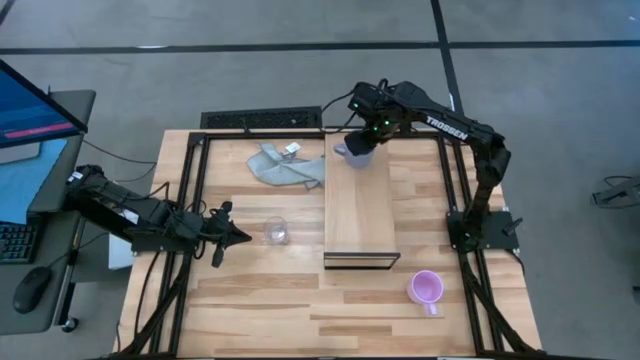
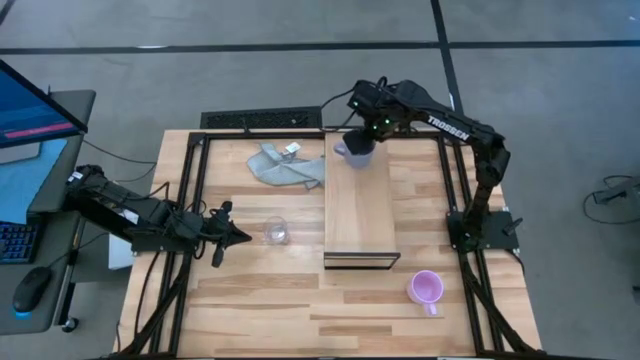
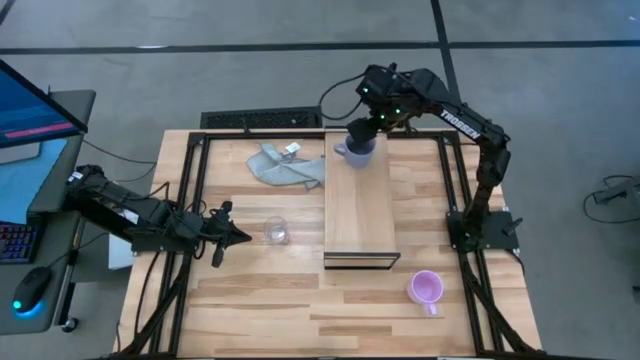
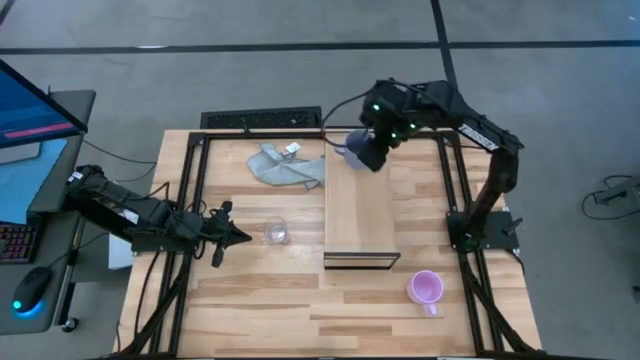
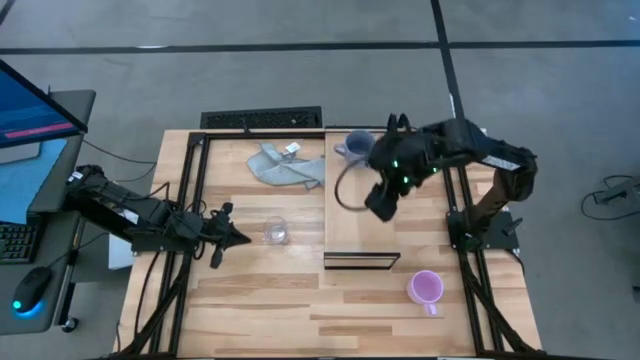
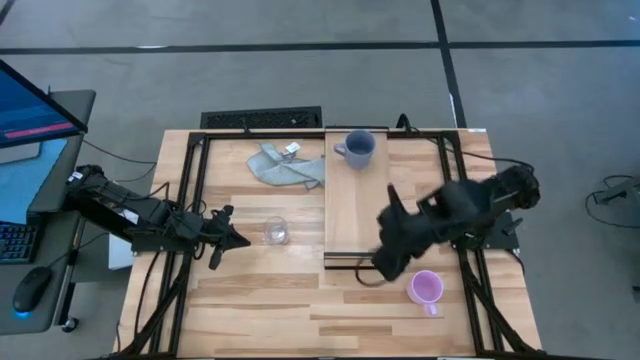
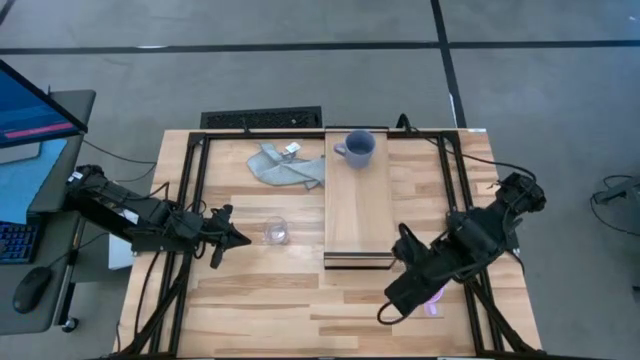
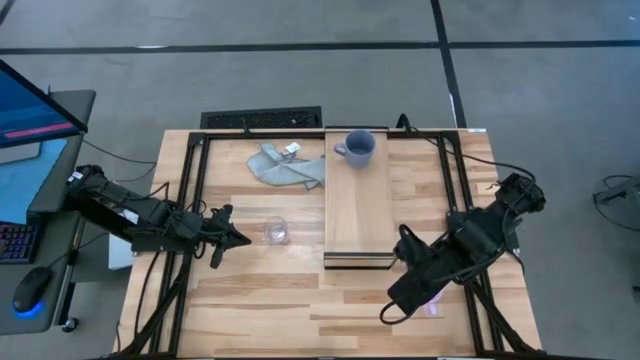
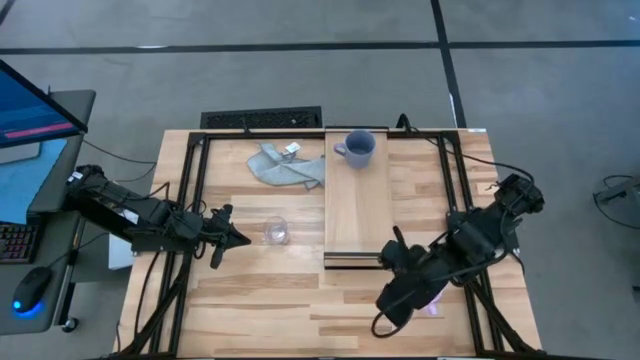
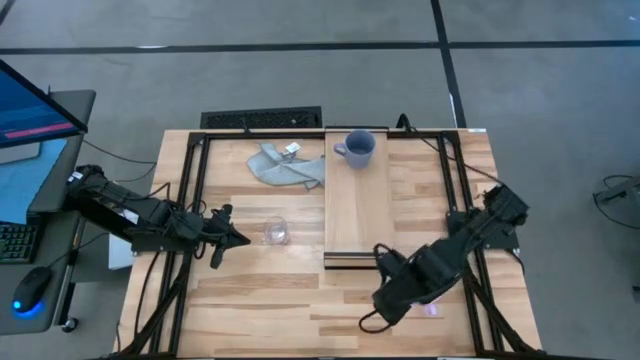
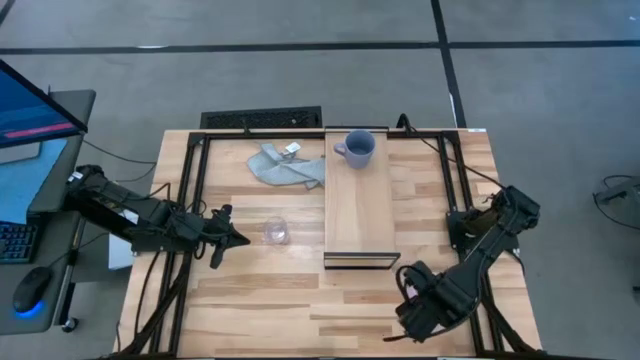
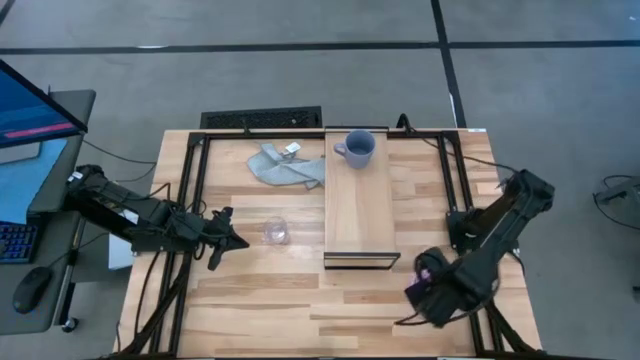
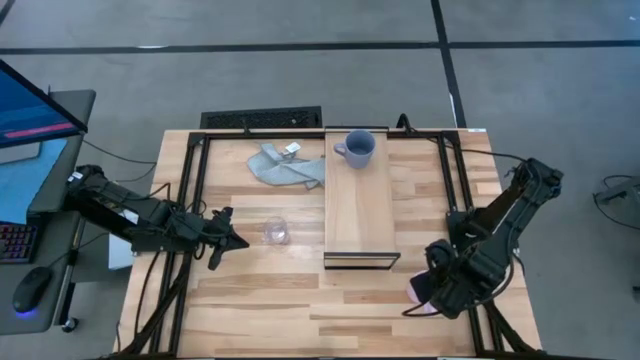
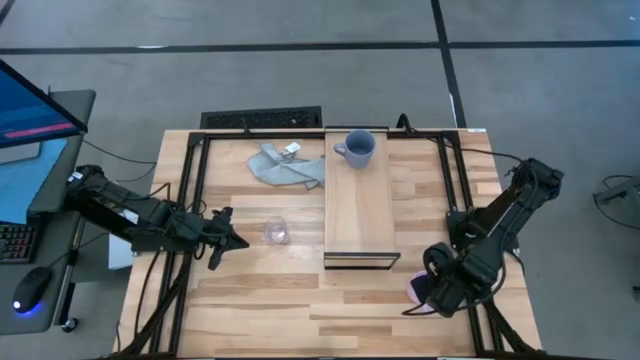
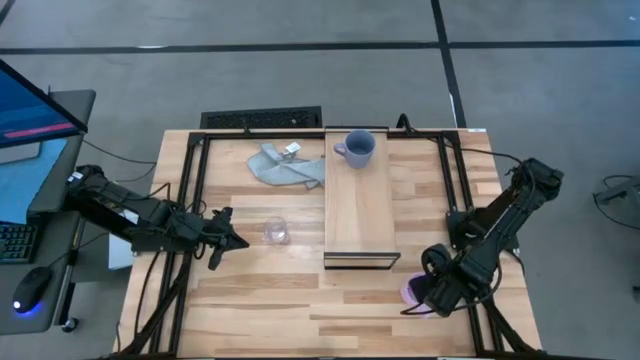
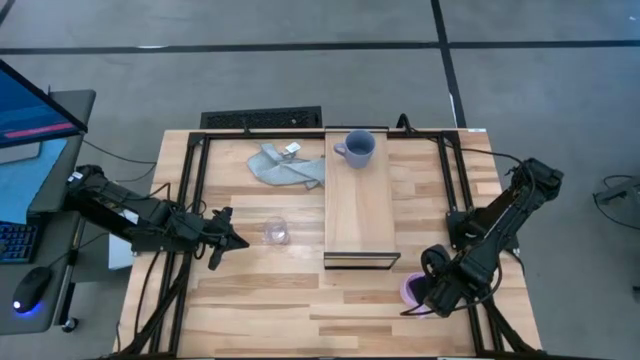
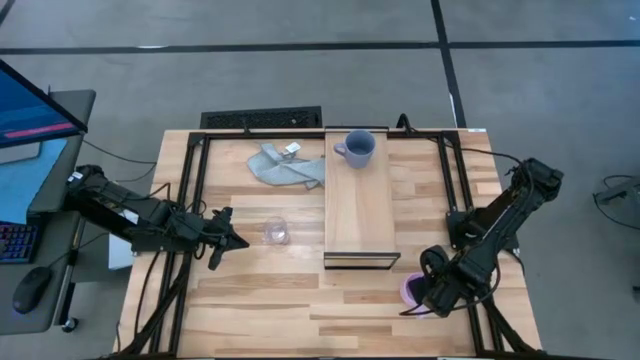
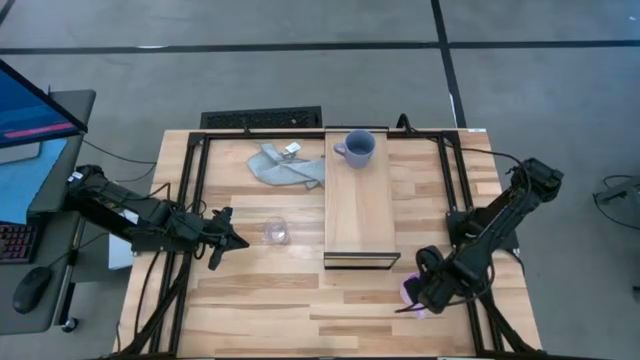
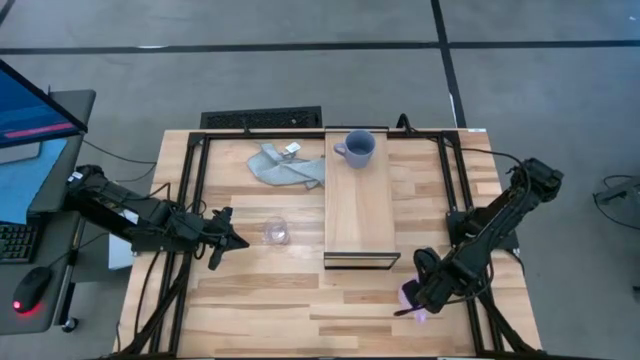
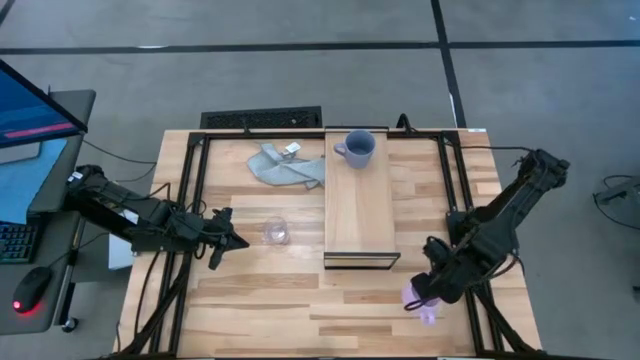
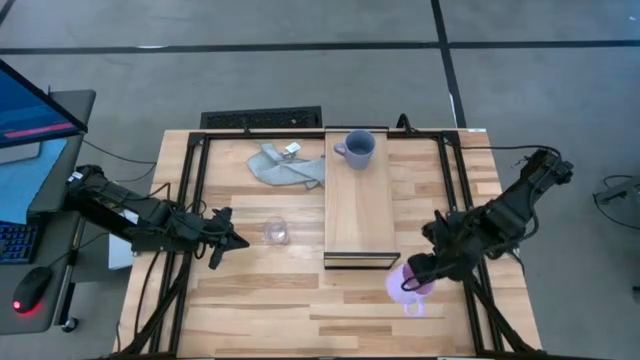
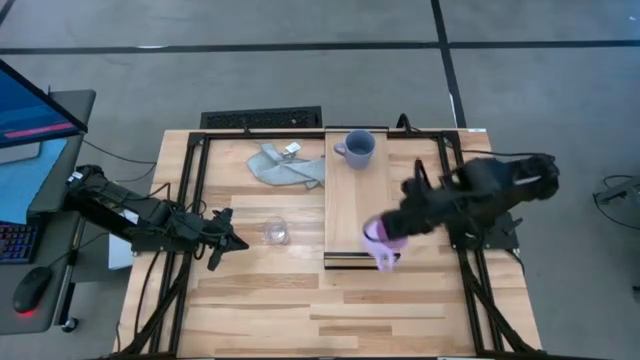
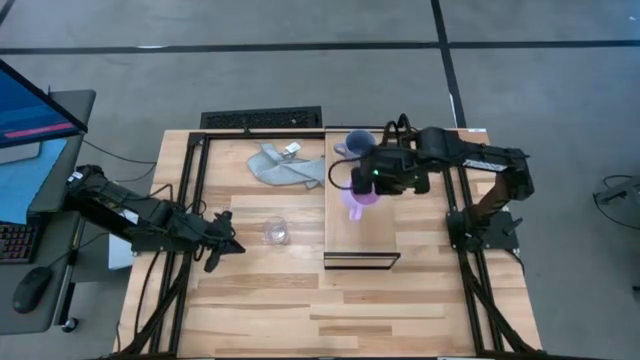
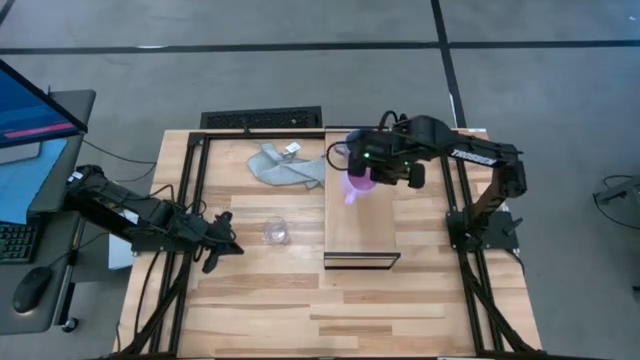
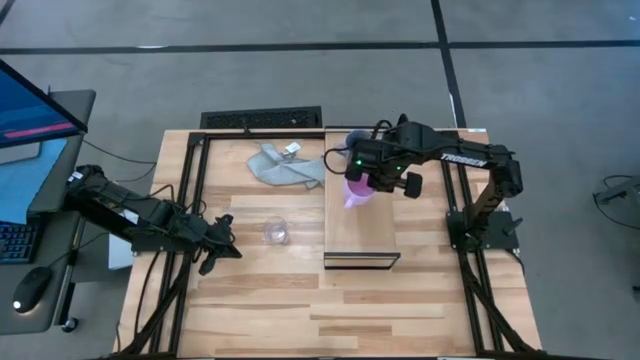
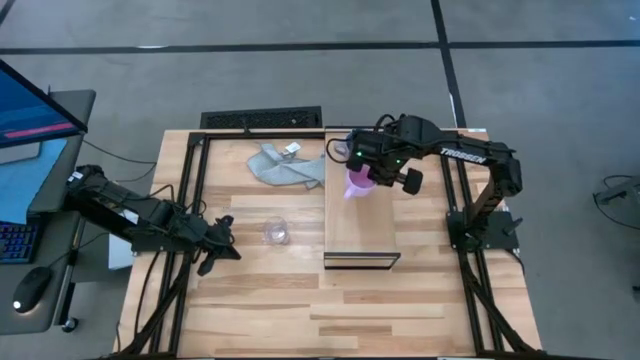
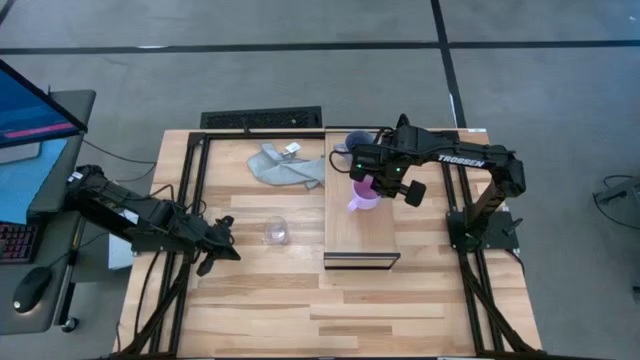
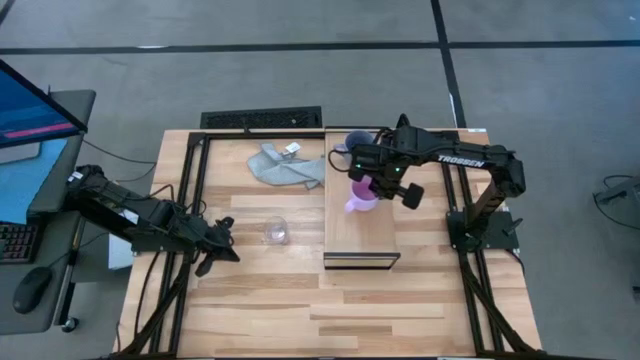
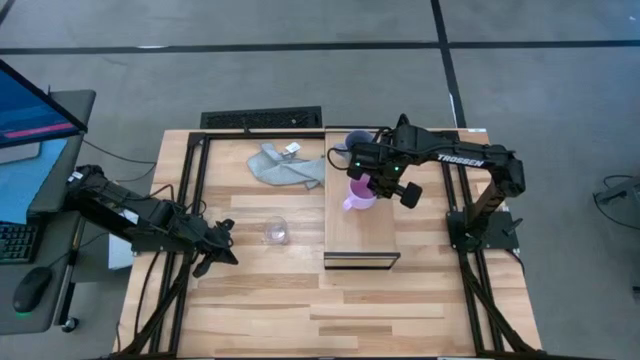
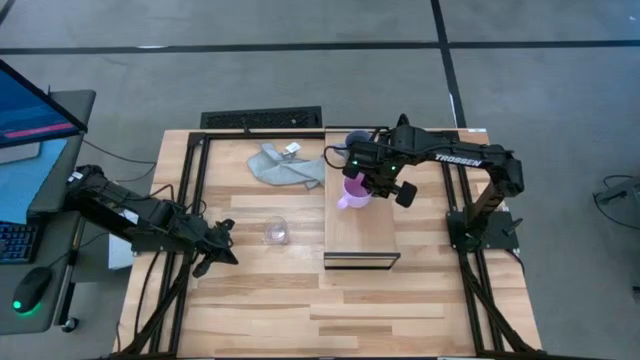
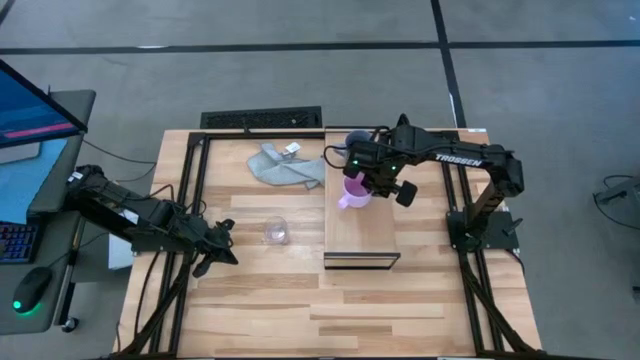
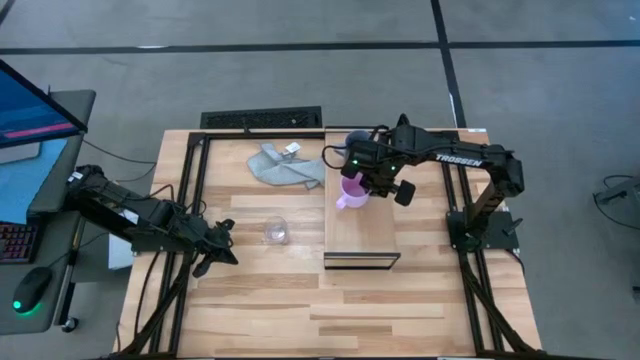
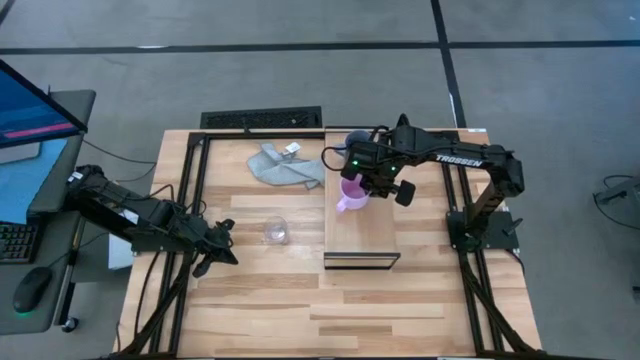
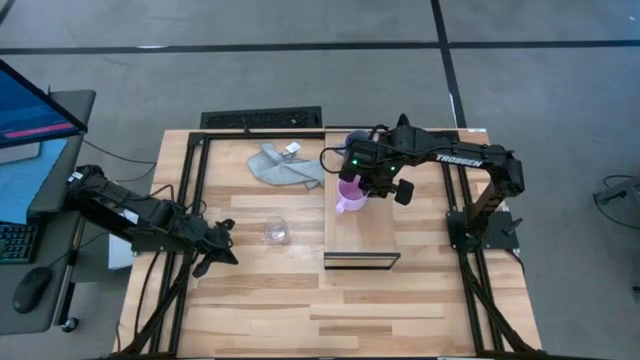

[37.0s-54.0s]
Task: Stack small to large cups/mugs on shelf
Put the pink mug on the shelf

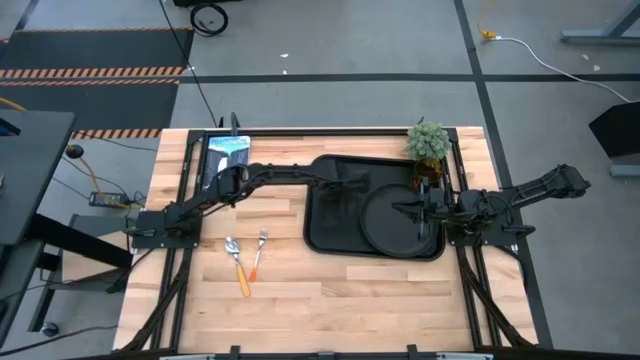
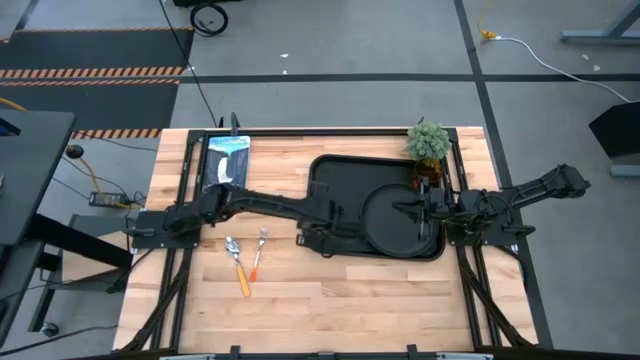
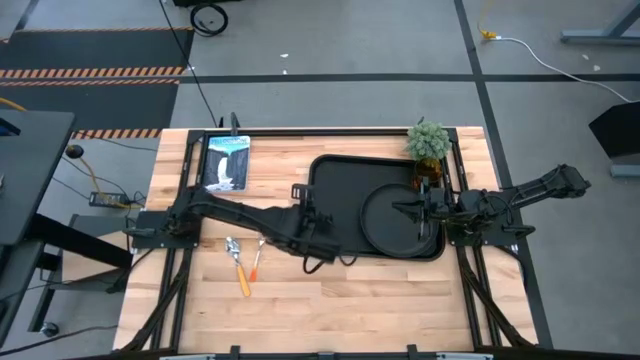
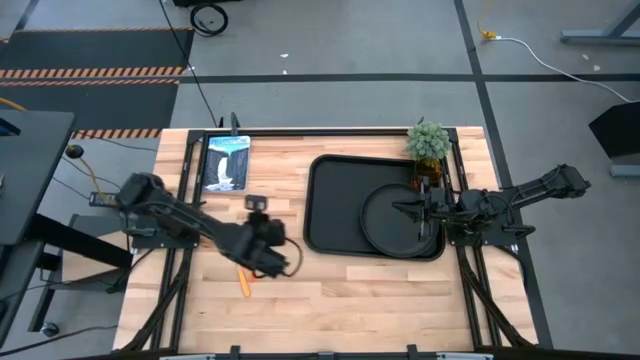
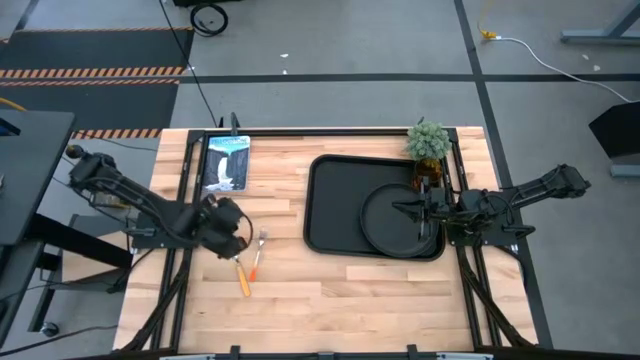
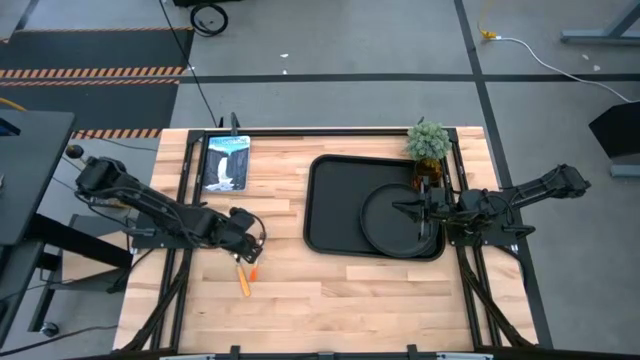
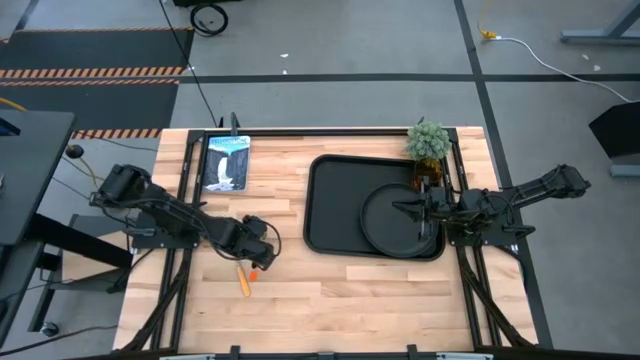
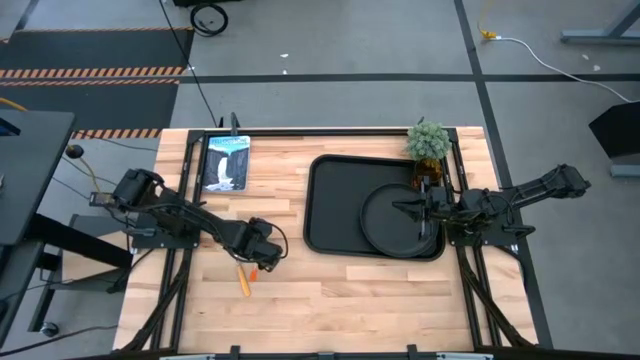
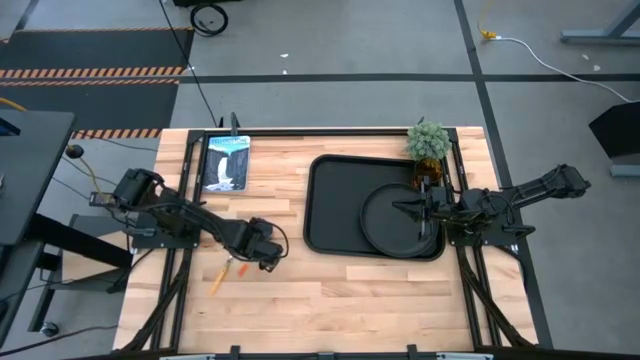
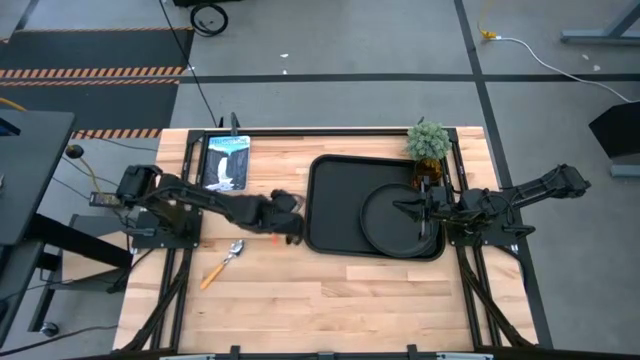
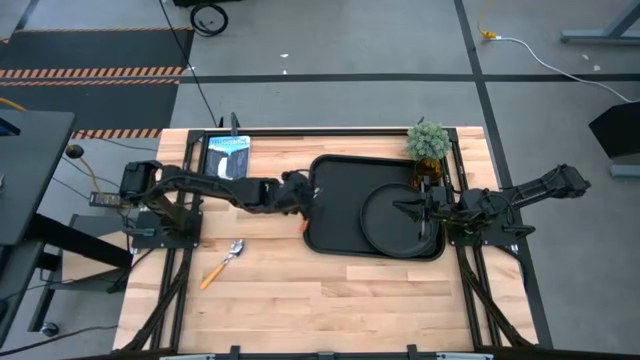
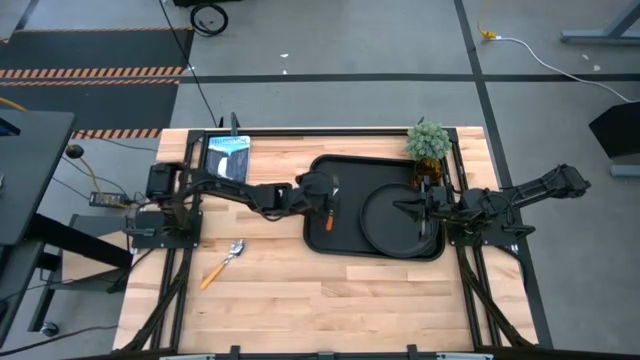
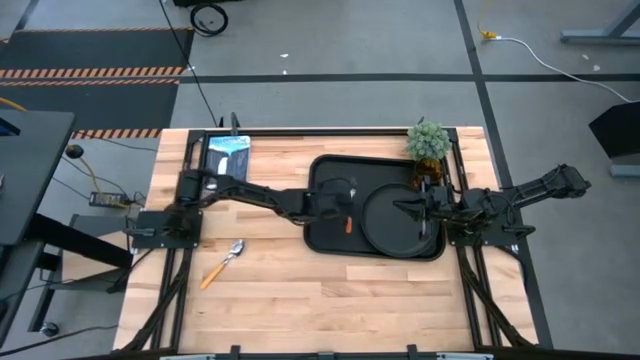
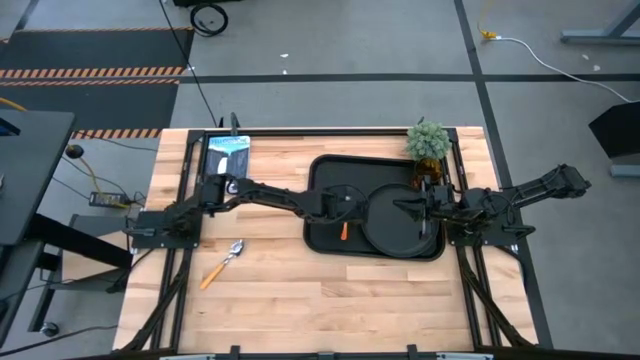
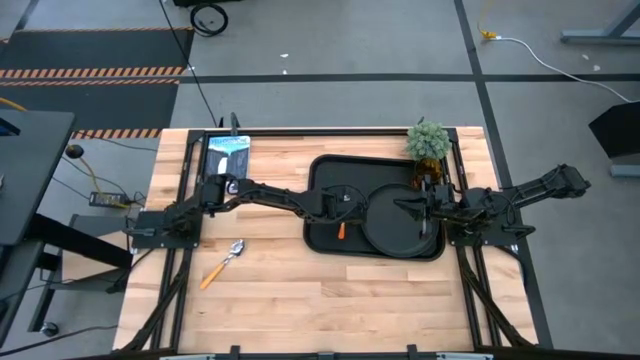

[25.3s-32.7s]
Task: Pick and place plate/cup/fork/spoon on tray
Put the orange fork on the black serving tray to the left of the black plate
